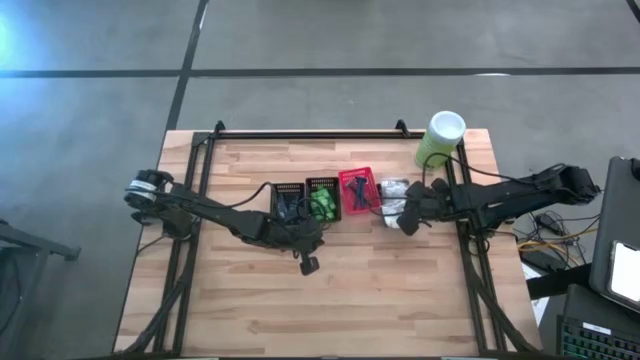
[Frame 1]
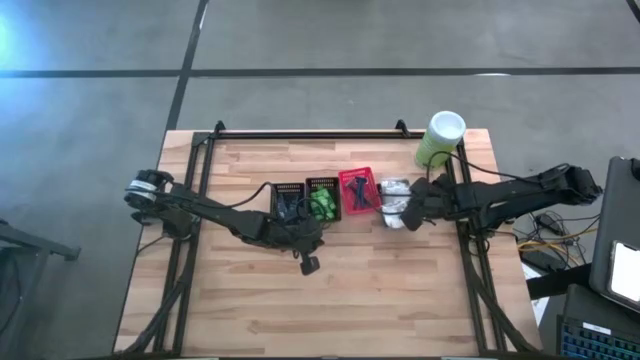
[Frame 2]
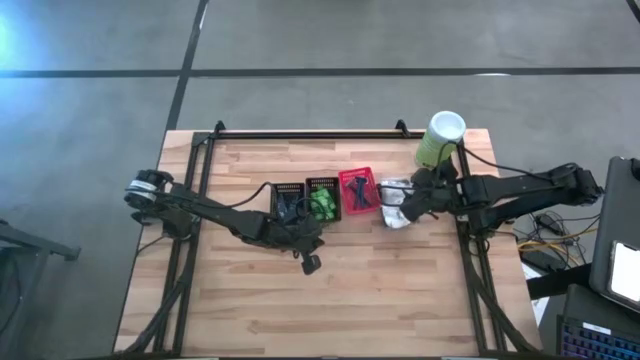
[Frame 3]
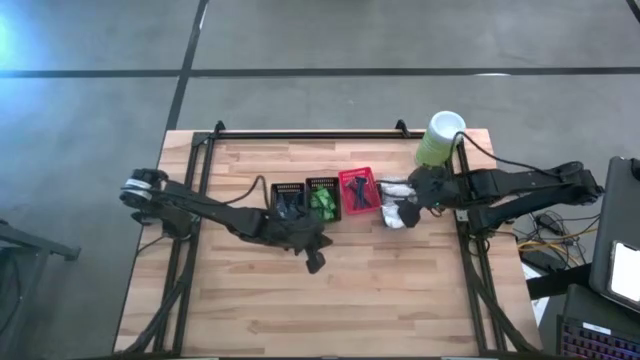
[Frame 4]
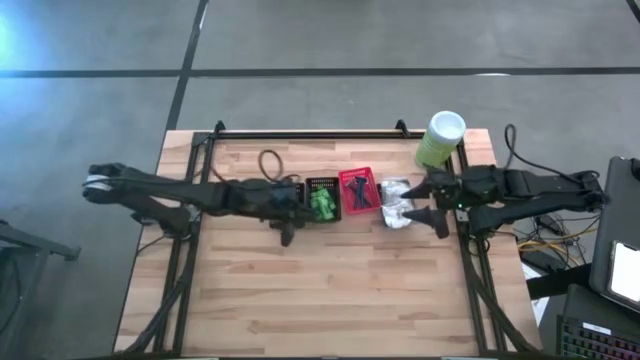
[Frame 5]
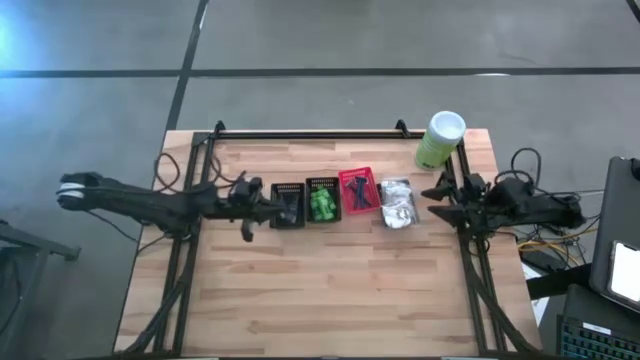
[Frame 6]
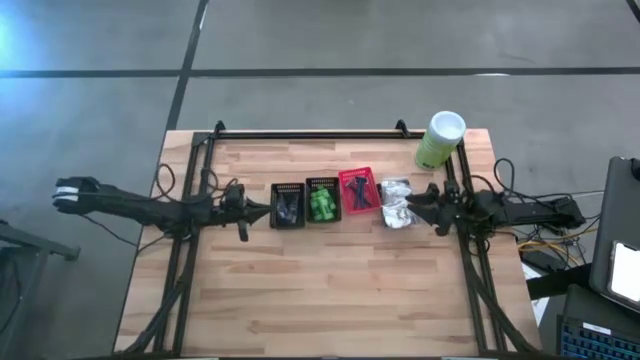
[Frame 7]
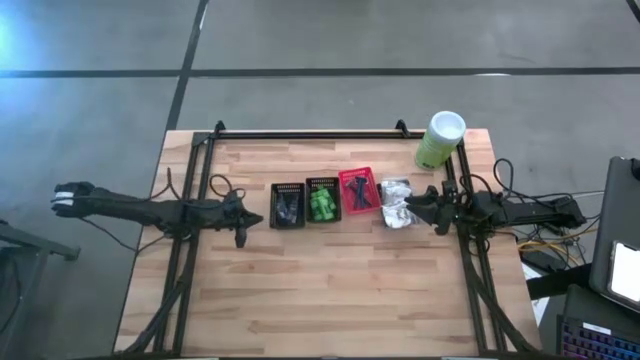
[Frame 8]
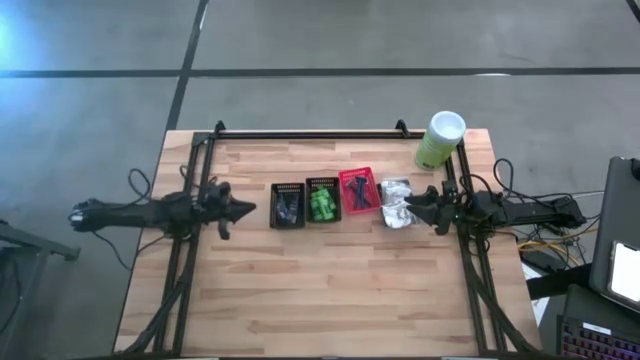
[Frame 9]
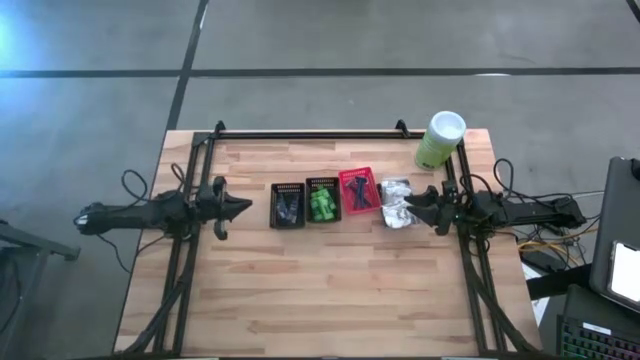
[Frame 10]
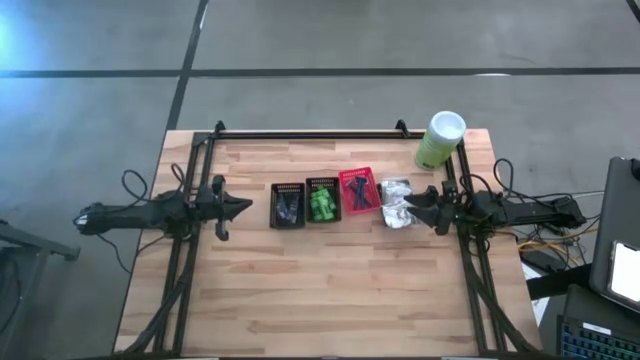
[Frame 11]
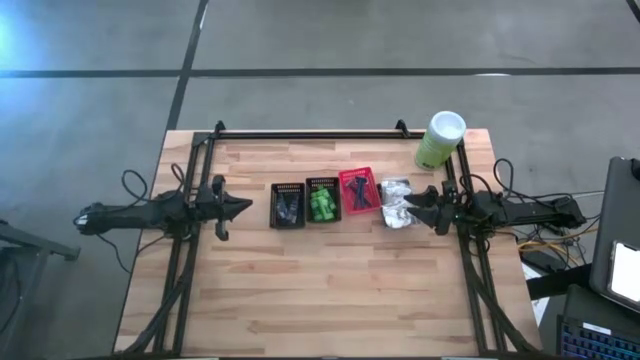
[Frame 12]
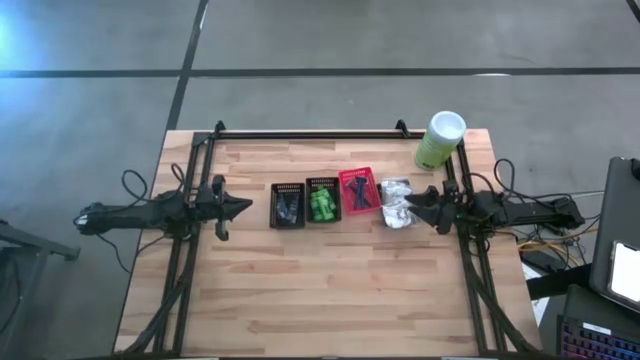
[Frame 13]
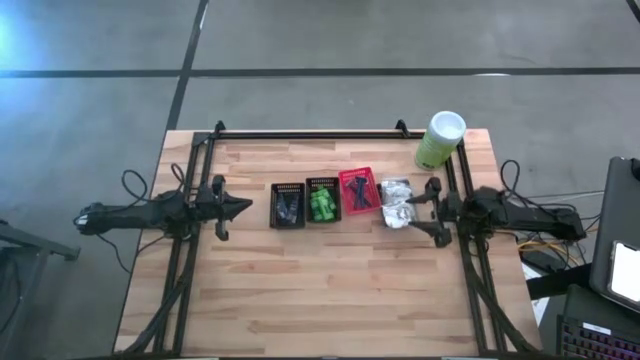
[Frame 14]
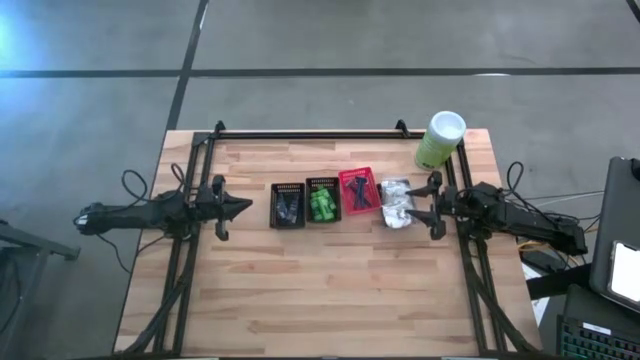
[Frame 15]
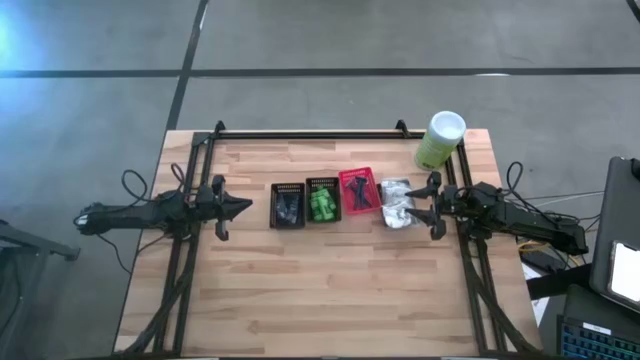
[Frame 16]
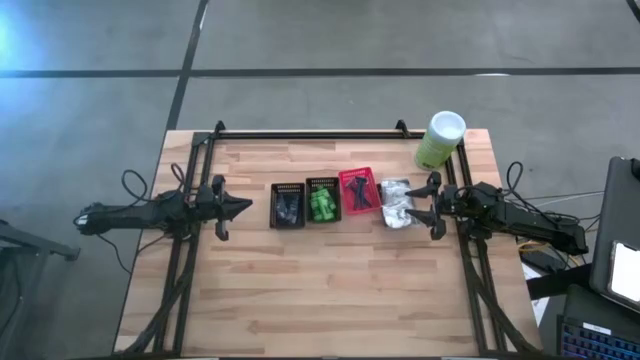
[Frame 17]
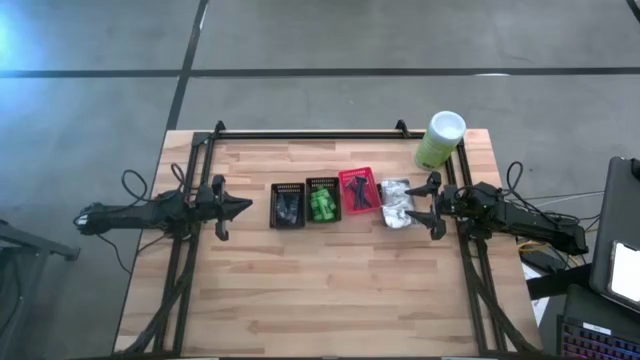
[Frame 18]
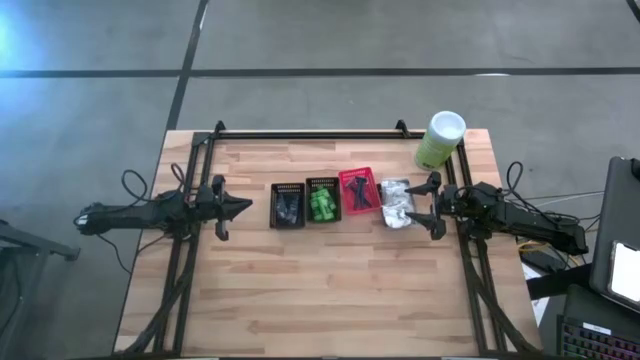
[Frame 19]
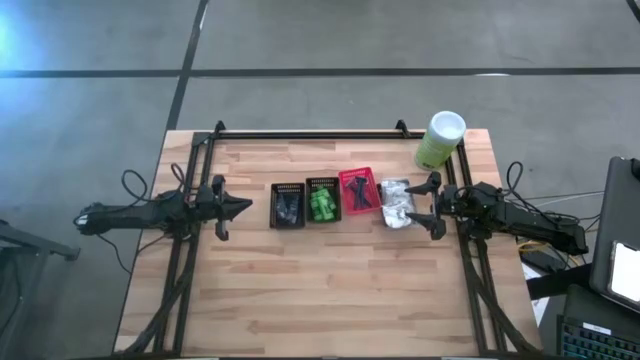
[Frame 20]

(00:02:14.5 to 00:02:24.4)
Task: Pick & Place Travel size toiletries
Return to Home Position

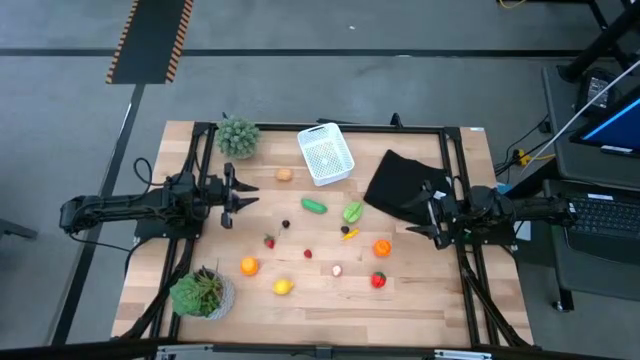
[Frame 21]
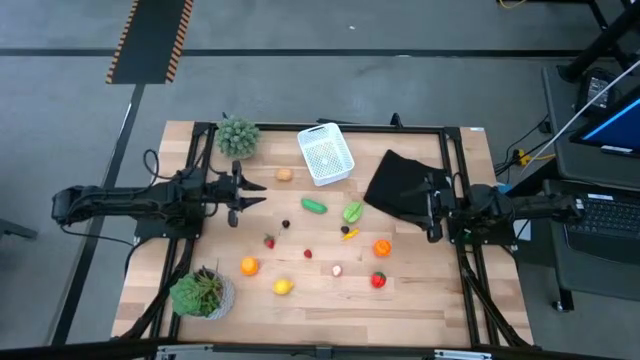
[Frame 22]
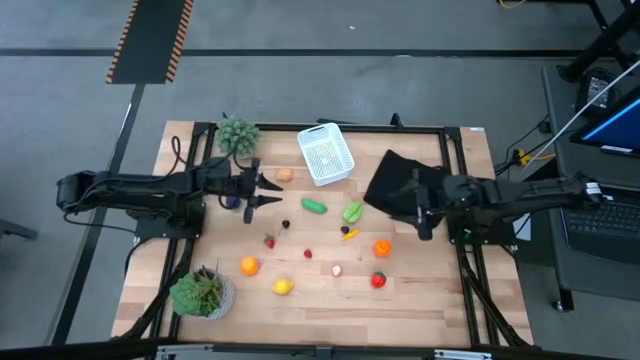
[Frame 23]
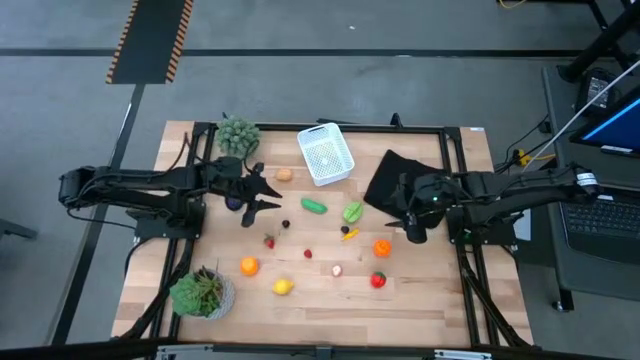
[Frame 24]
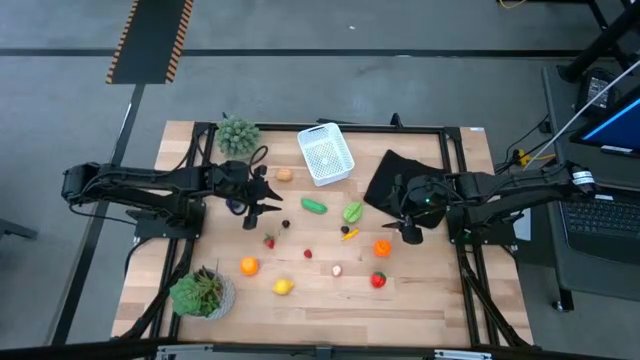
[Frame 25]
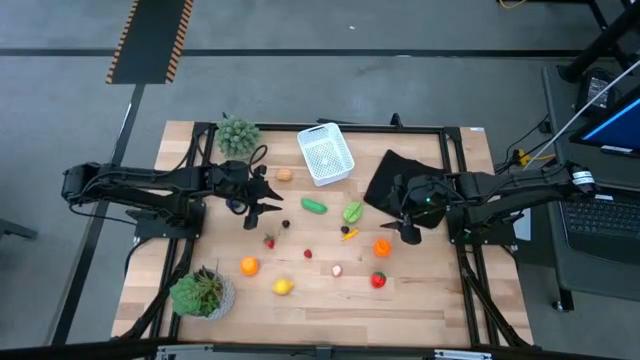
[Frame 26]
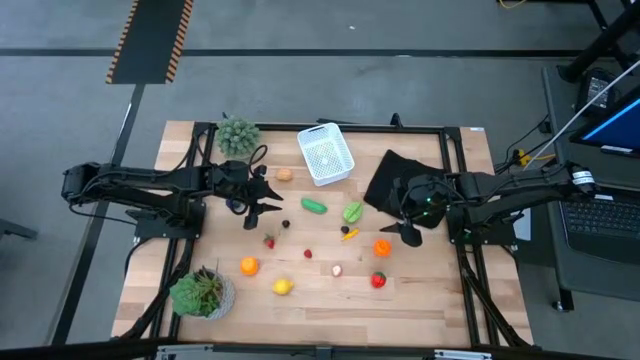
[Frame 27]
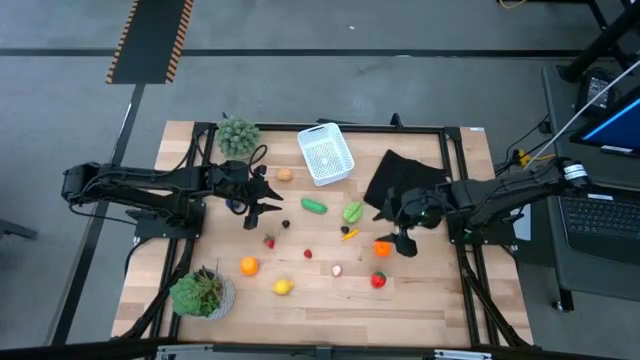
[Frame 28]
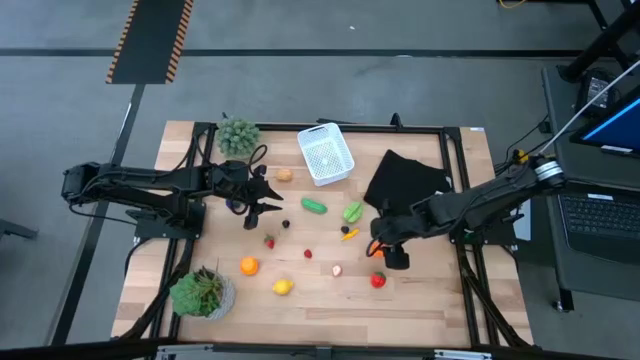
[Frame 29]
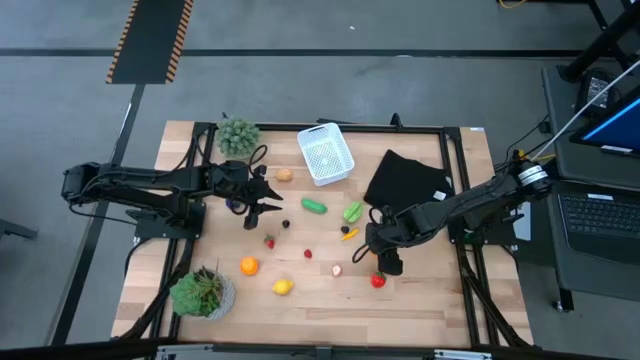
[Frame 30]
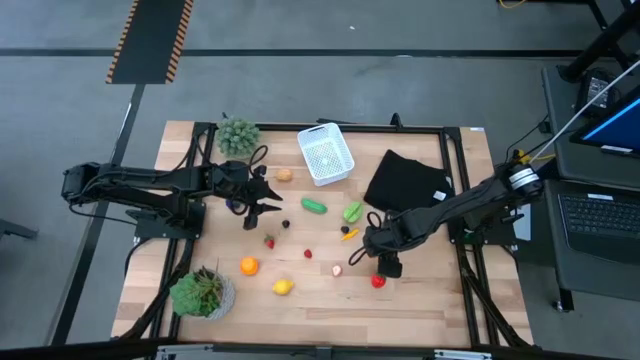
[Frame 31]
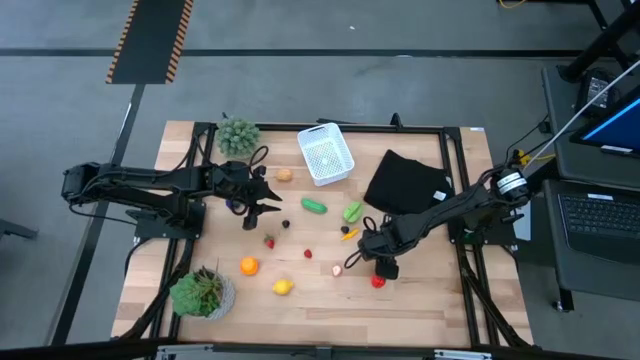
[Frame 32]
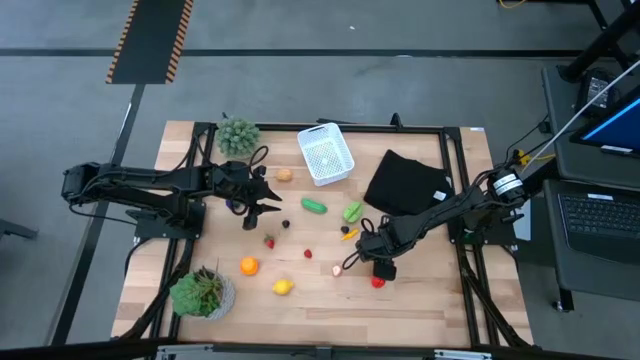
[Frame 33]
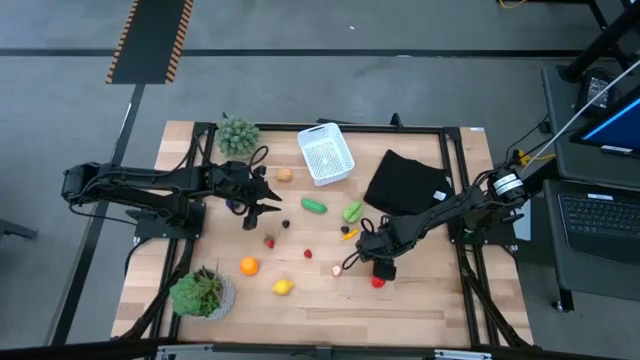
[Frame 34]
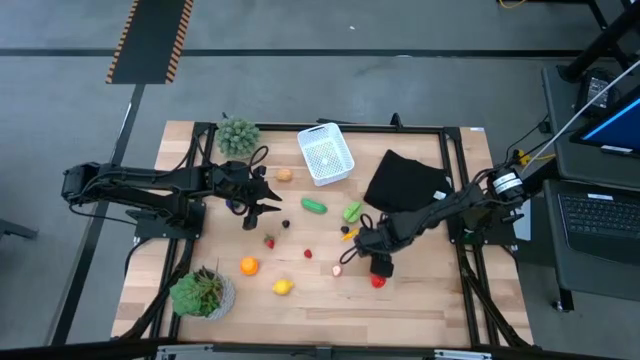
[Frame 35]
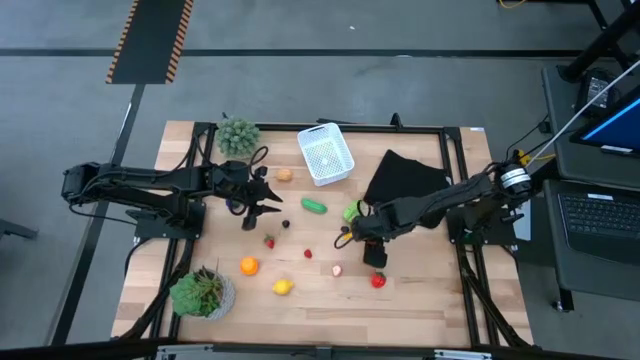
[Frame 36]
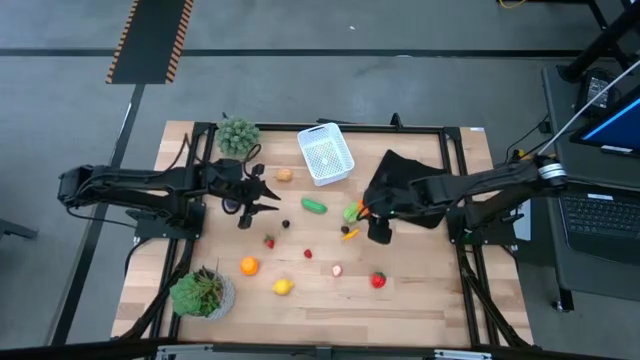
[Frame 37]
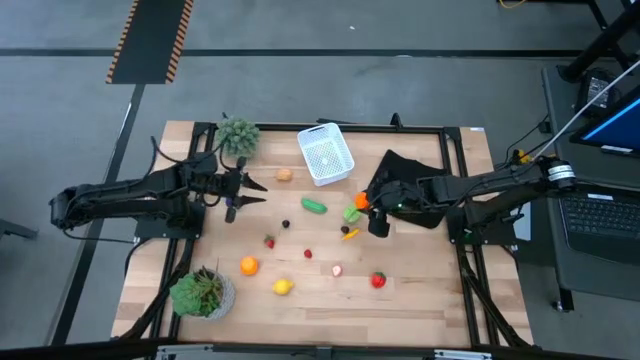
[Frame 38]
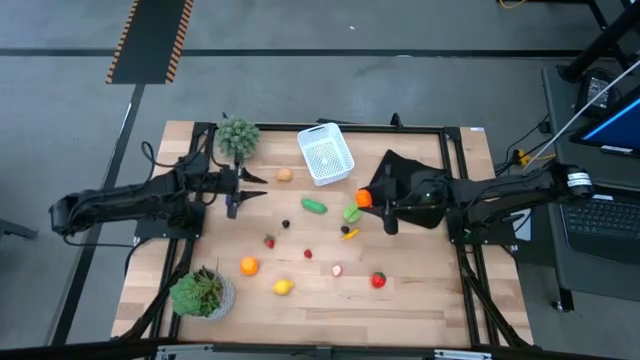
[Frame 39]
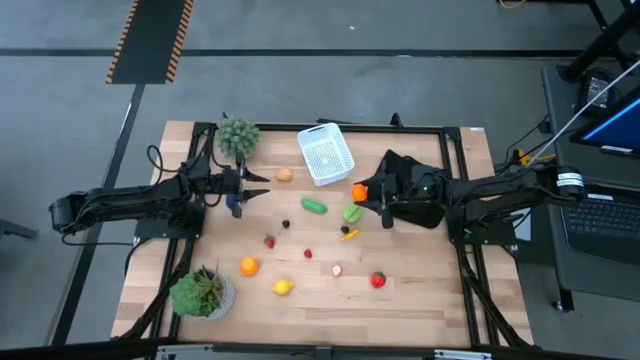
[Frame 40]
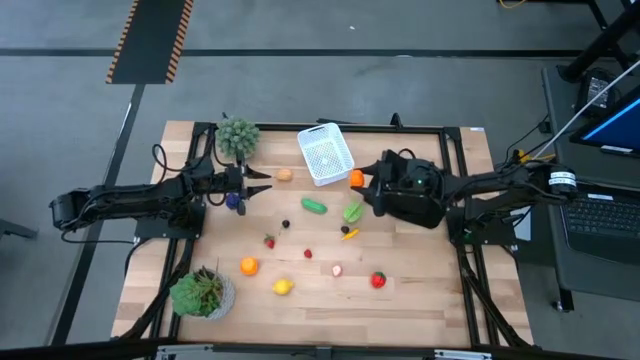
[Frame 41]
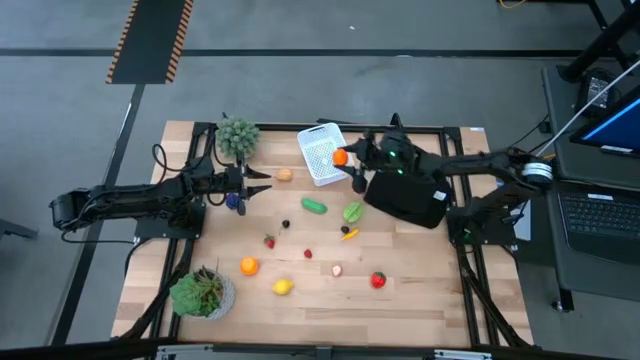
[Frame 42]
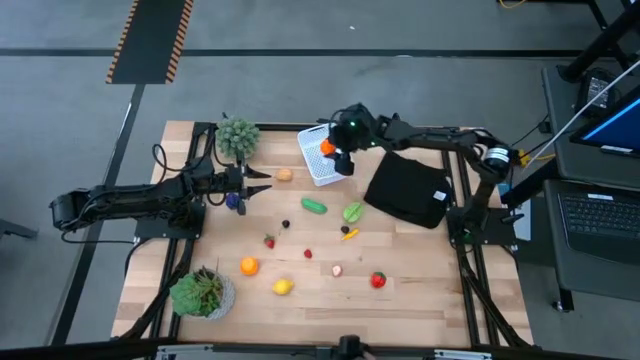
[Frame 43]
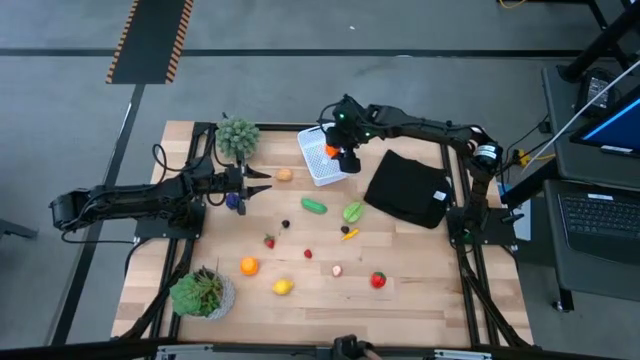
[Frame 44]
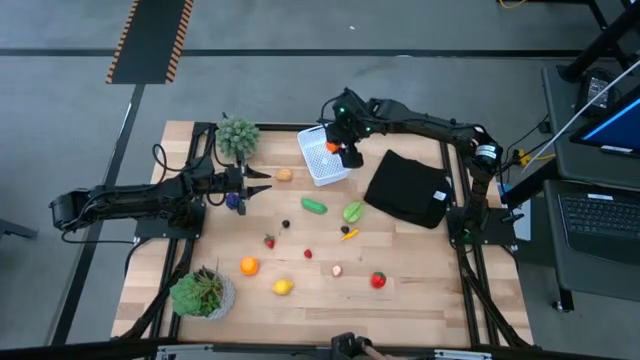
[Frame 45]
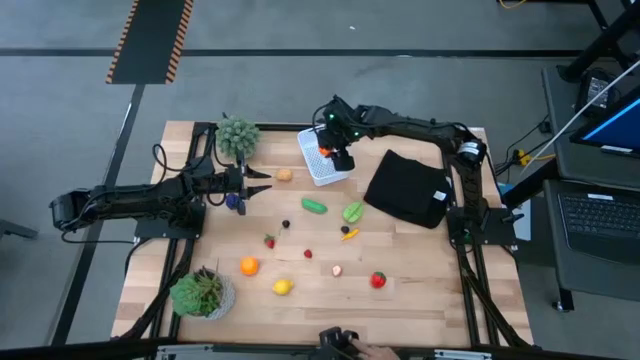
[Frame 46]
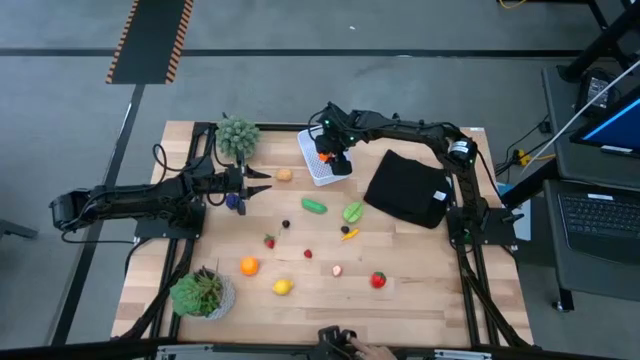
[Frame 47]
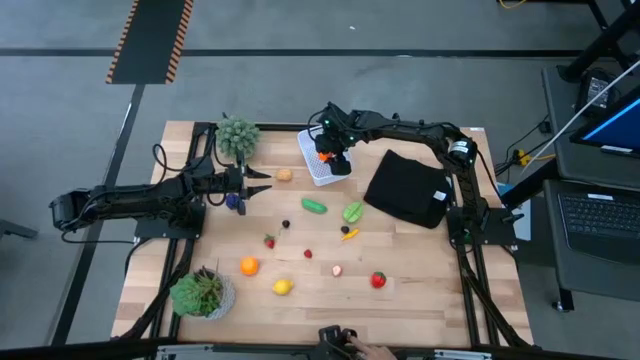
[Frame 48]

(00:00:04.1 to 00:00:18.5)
Task: Pick and placing Produce into tupperware
Put the tangerine into the basket
